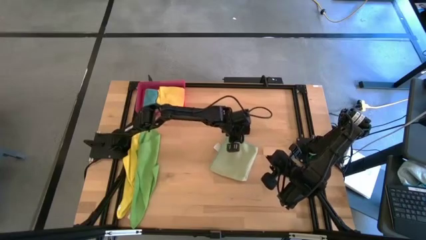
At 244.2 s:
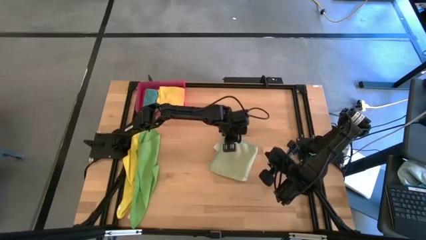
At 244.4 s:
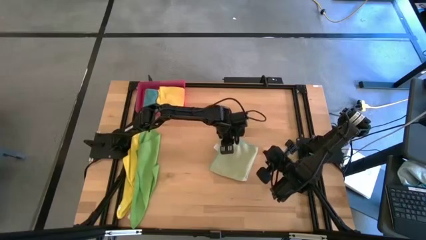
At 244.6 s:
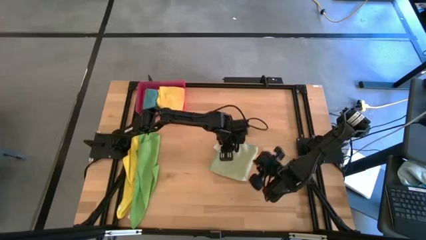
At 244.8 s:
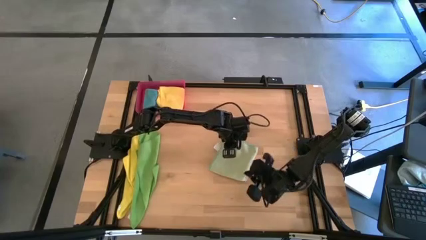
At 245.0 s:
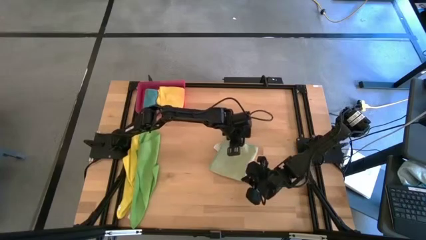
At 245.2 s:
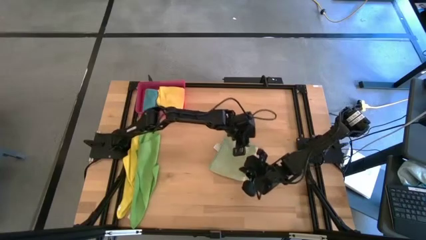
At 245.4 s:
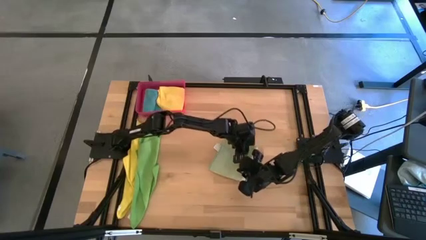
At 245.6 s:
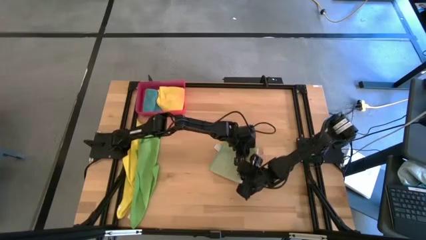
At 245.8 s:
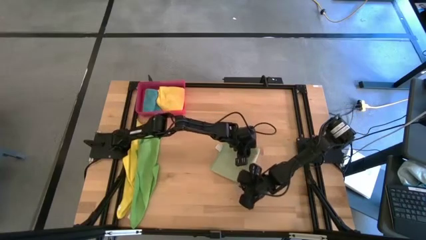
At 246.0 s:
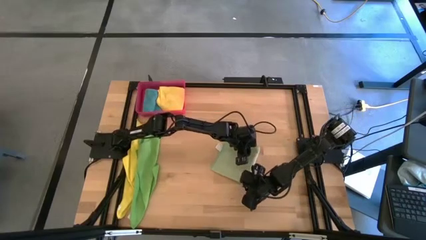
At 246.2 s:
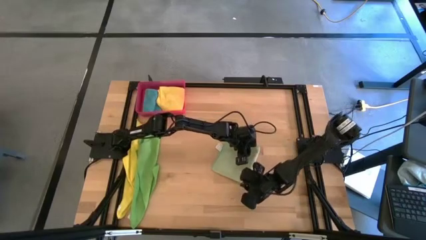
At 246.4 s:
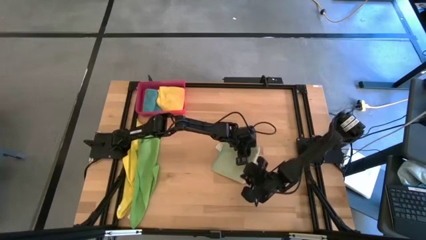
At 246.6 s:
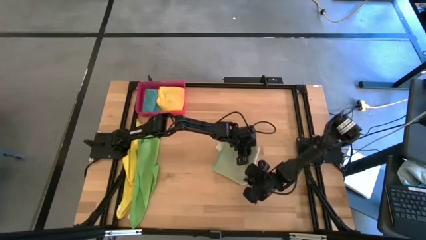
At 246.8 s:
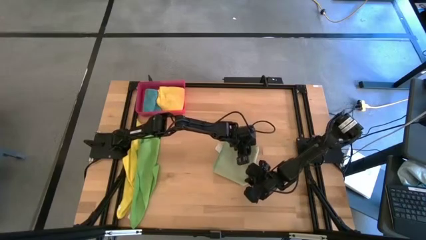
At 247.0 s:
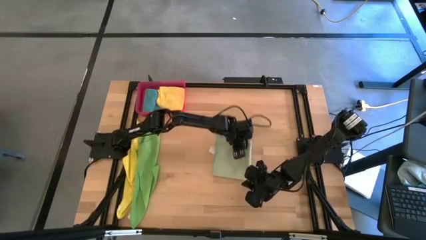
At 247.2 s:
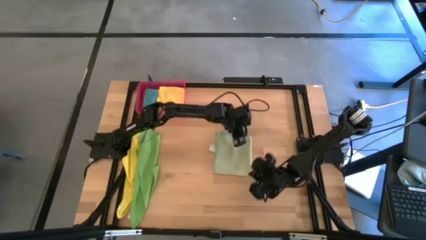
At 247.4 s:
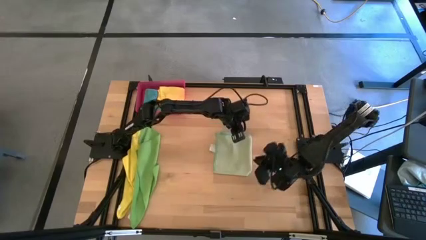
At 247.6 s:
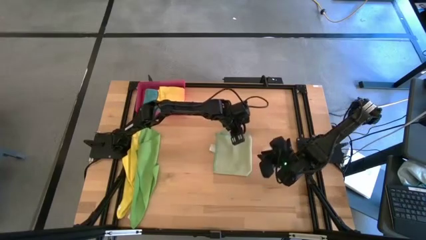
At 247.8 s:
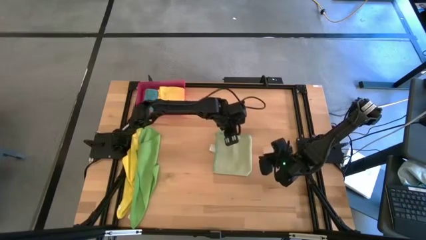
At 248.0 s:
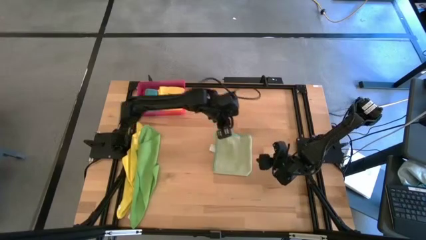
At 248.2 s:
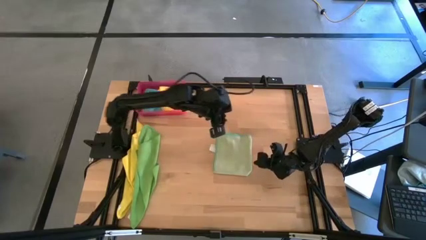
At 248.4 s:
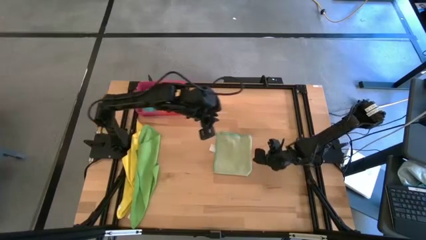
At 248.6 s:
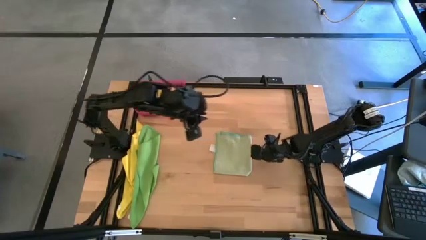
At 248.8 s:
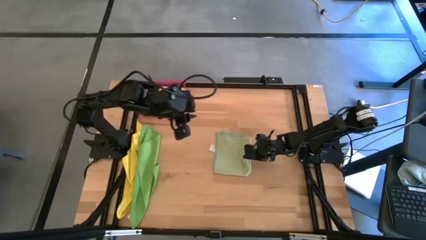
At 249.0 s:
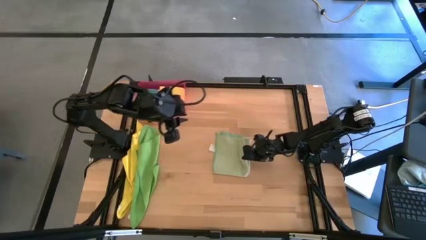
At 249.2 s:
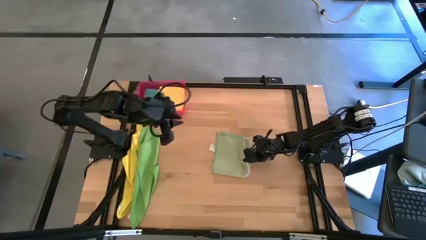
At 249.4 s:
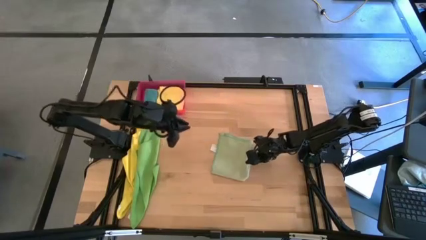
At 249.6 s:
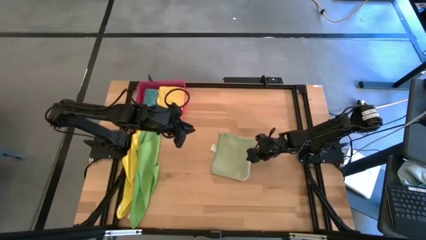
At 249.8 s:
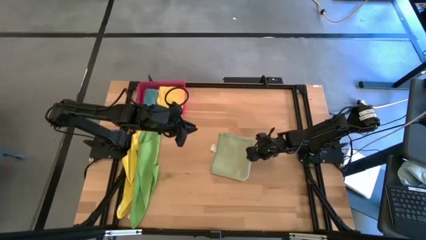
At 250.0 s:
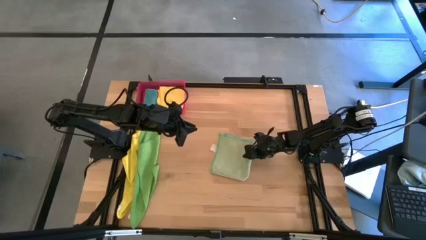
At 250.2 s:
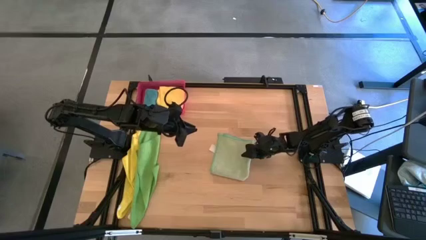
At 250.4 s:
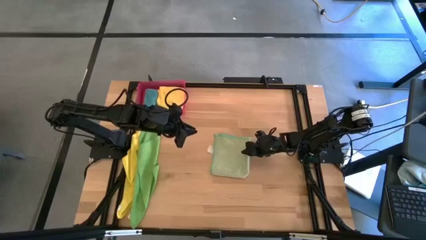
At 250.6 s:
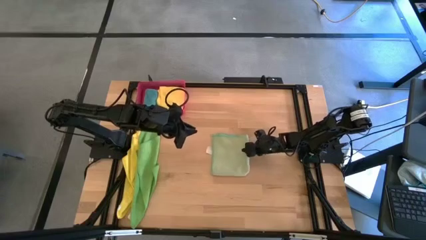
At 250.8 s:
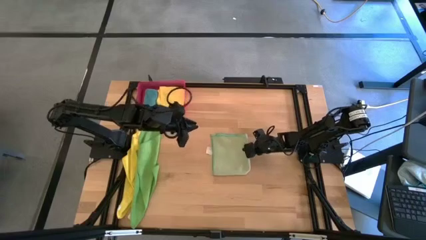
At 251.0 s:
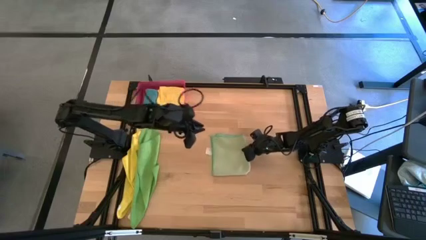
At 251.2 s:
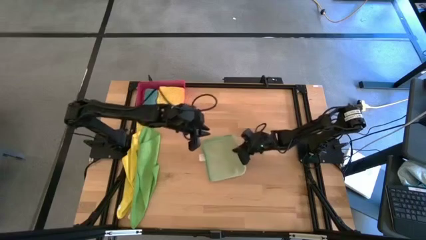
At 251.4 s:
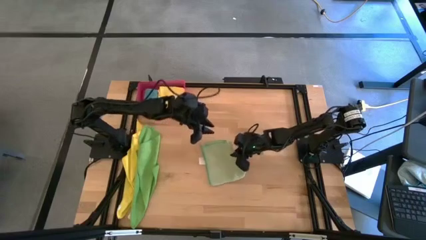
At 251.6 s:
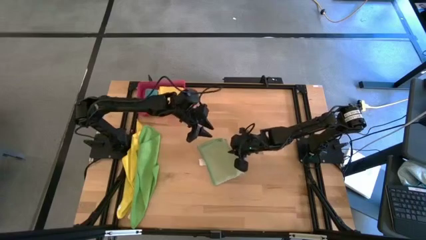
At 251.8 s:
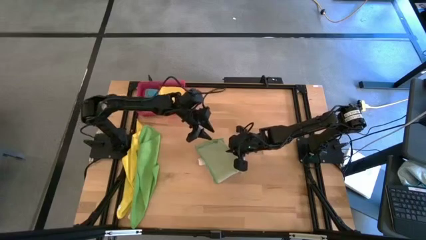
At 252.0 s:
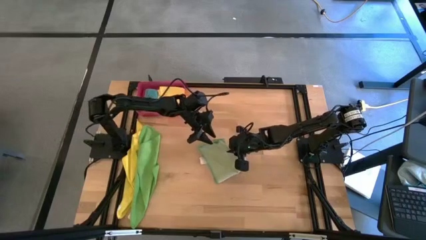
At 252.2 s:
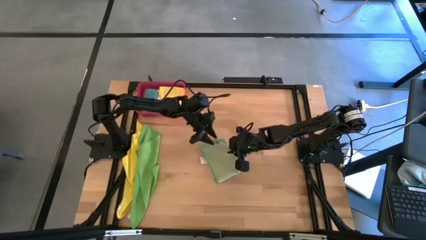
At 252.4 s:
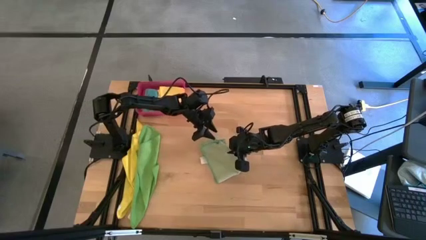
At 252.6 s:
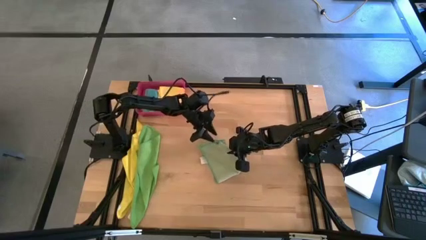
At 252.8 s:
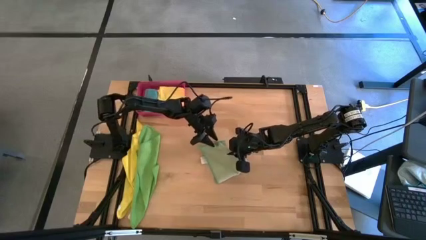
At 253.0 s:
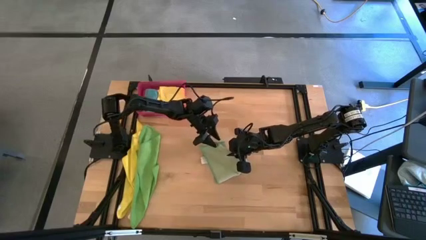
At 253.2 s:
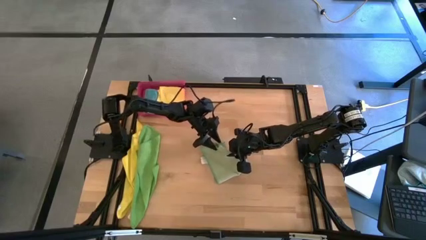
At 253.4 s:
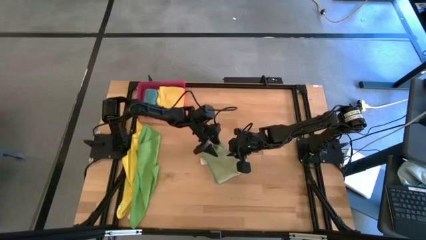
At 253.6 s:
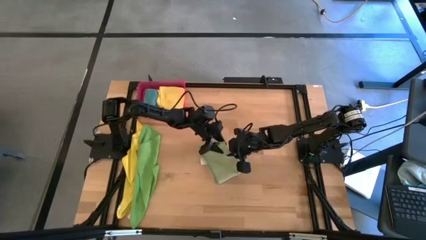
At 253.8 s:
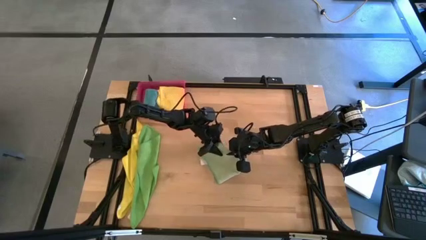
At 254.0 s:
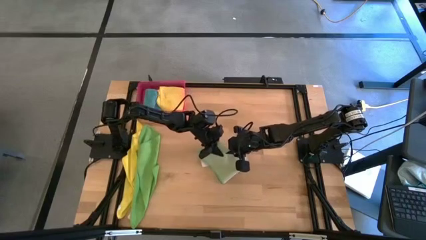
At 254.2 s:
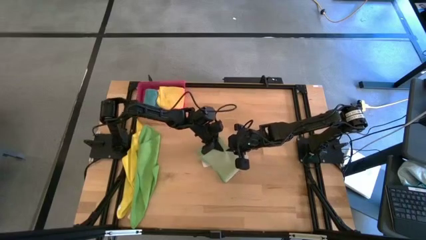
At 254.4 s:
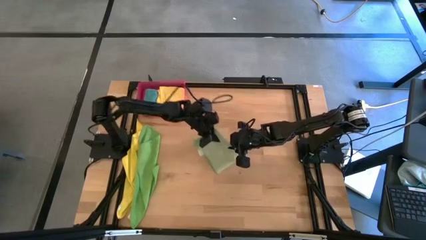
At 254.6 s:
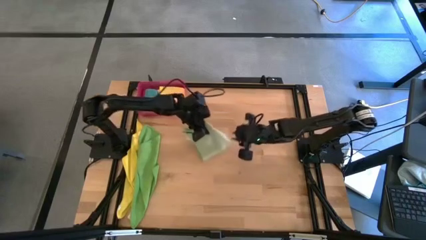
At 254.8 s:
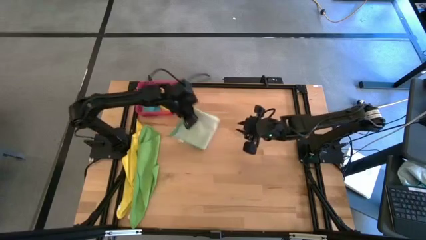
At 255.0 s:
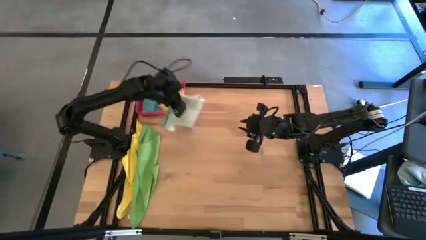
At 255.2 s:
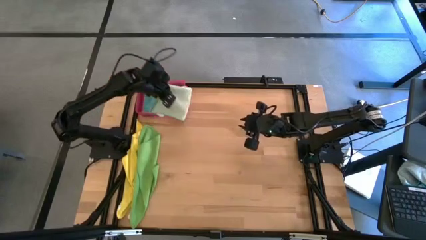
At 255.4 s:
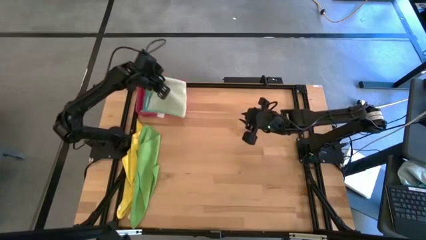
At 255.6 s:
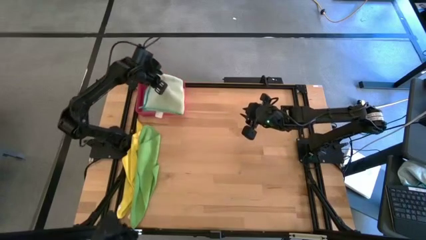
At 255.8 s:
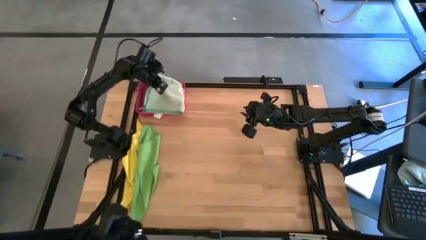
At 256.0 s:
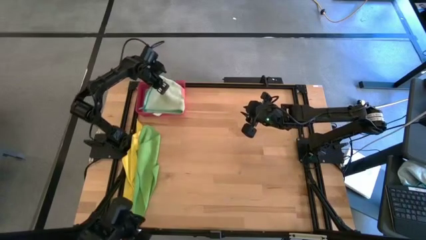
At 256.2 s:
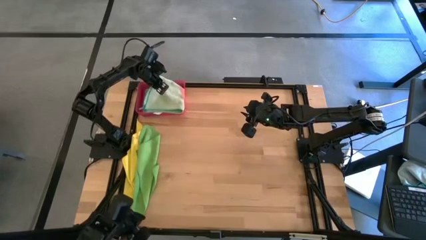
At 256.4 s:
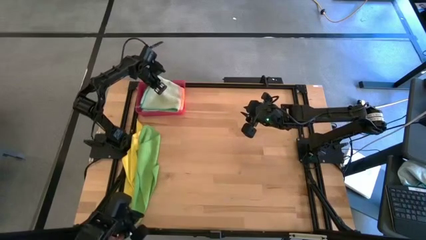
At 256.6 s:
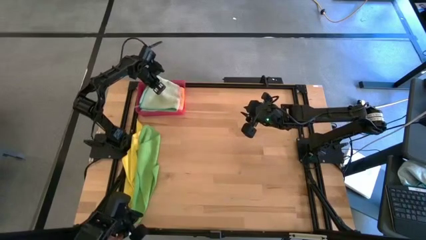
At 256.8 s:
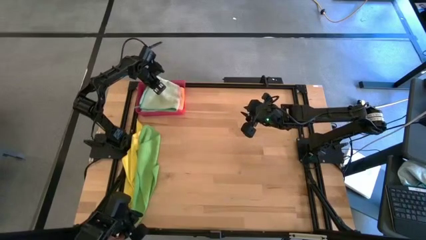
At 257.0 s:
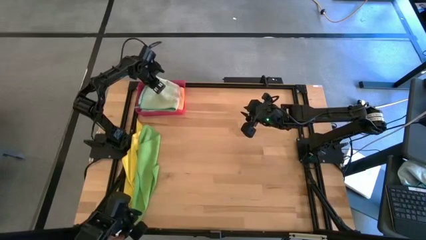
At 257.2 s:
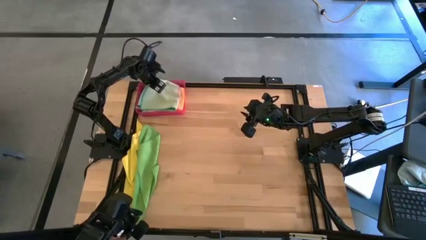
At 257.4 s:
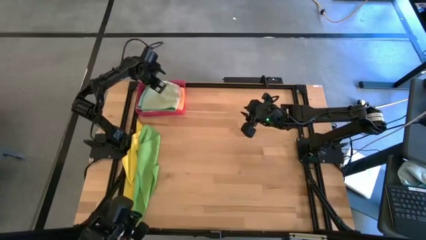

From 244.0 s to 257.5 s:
Task: Fold microfiber towels
Stack the folded light green microfiber towel on top of the folded yellow microfiber towel in the pink bin
